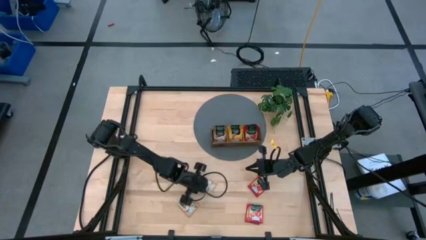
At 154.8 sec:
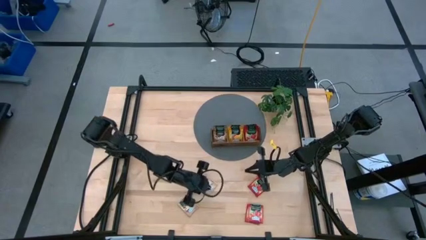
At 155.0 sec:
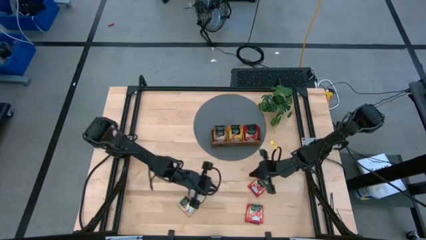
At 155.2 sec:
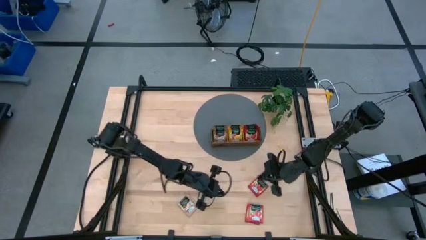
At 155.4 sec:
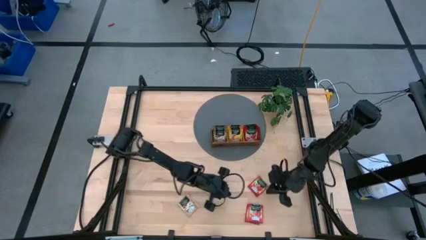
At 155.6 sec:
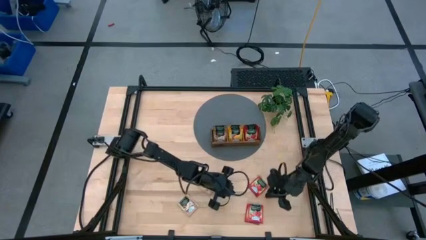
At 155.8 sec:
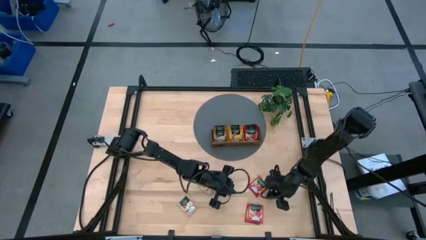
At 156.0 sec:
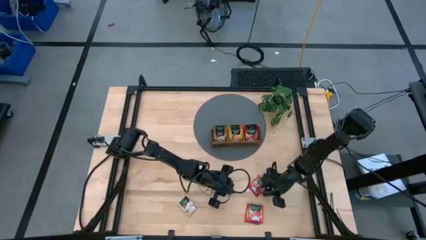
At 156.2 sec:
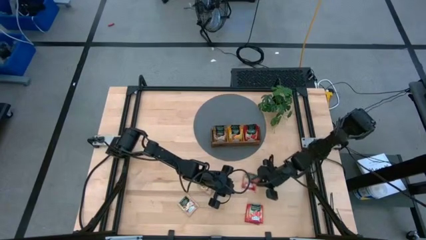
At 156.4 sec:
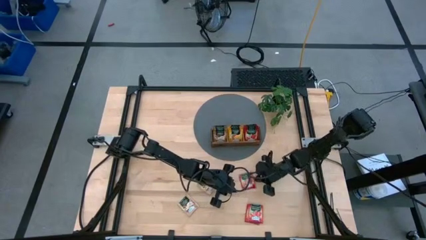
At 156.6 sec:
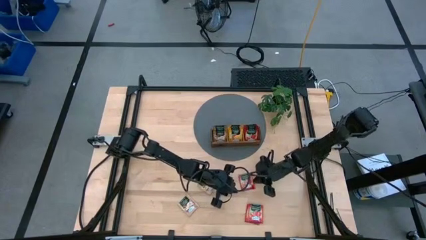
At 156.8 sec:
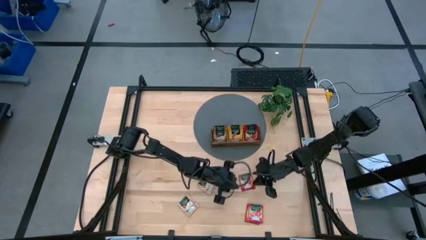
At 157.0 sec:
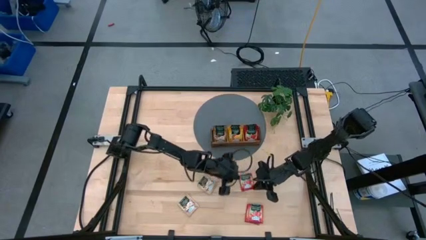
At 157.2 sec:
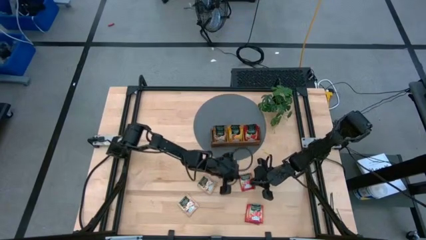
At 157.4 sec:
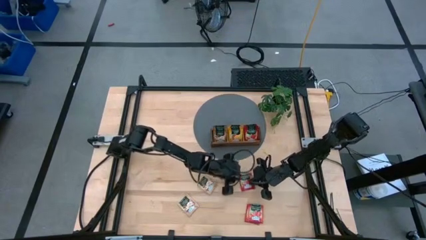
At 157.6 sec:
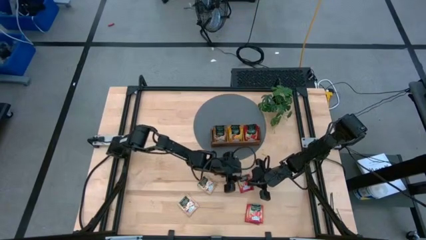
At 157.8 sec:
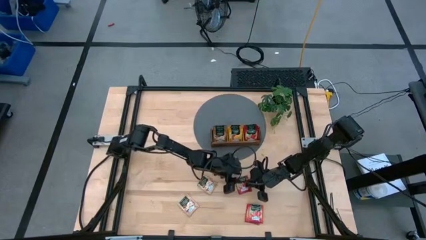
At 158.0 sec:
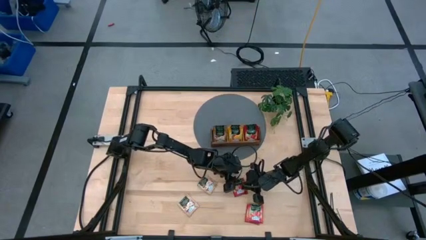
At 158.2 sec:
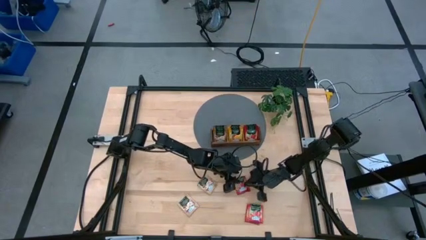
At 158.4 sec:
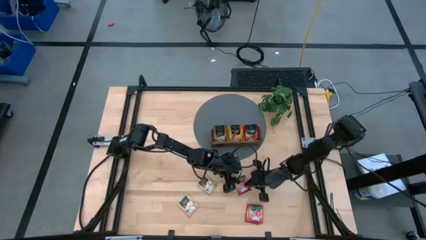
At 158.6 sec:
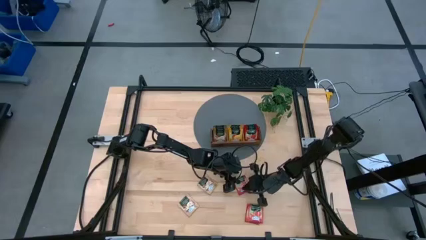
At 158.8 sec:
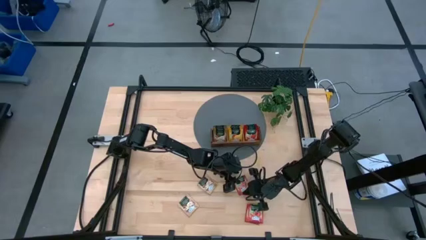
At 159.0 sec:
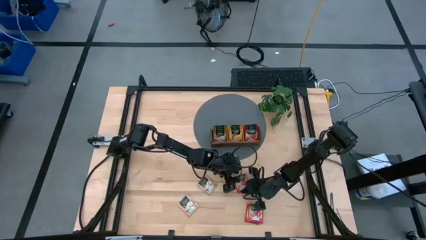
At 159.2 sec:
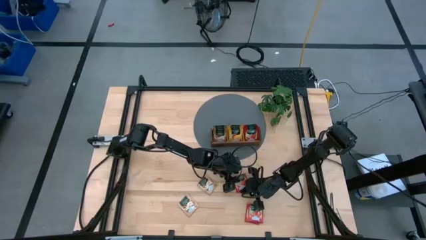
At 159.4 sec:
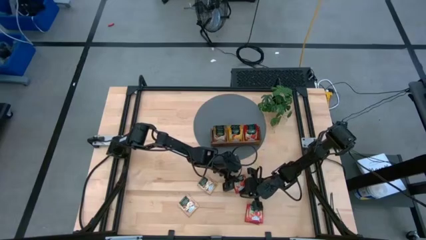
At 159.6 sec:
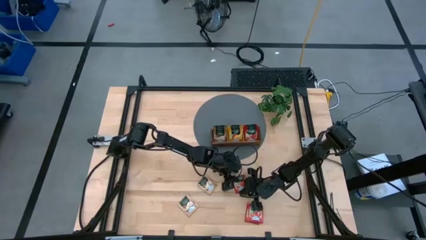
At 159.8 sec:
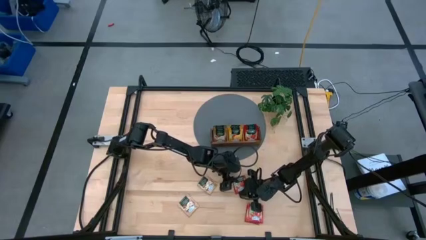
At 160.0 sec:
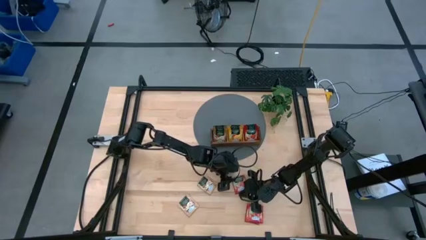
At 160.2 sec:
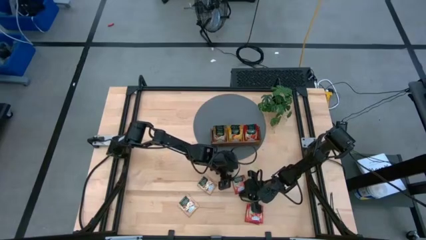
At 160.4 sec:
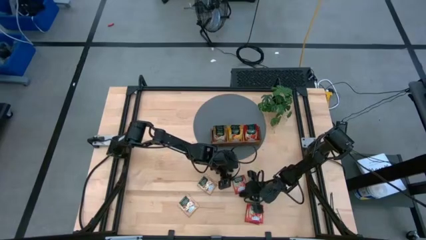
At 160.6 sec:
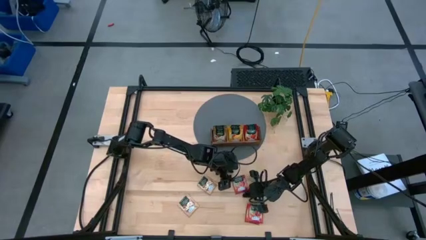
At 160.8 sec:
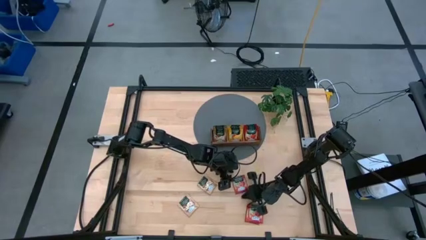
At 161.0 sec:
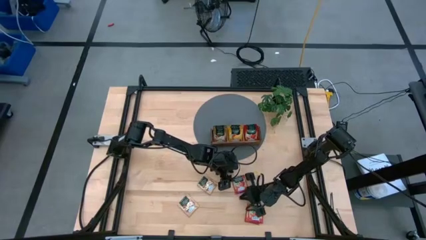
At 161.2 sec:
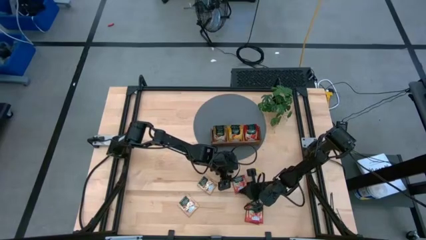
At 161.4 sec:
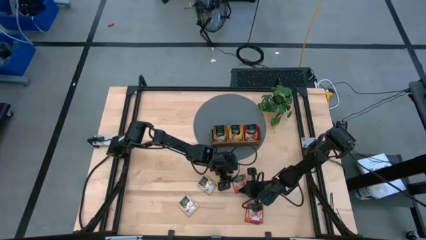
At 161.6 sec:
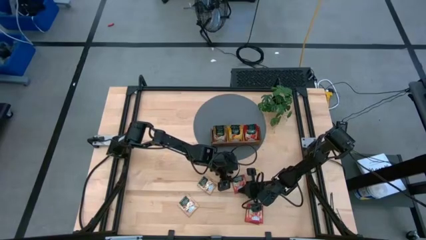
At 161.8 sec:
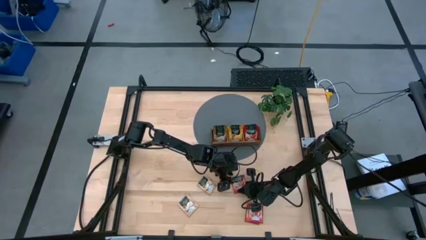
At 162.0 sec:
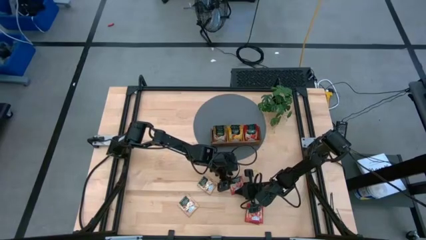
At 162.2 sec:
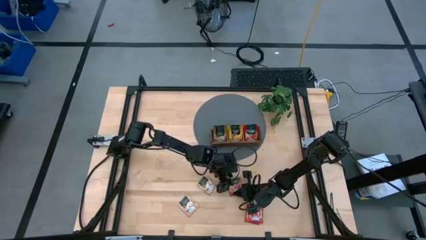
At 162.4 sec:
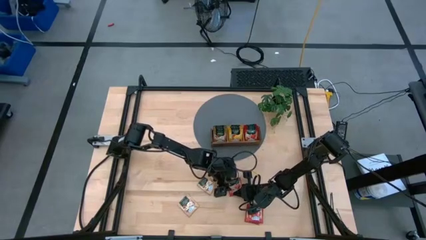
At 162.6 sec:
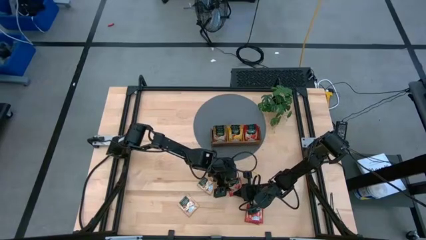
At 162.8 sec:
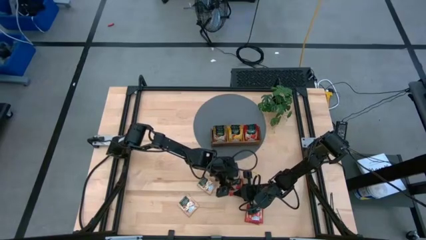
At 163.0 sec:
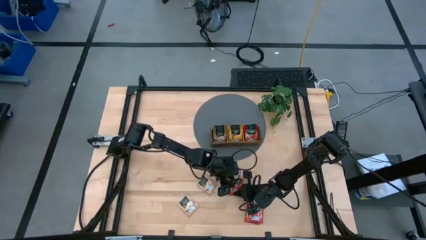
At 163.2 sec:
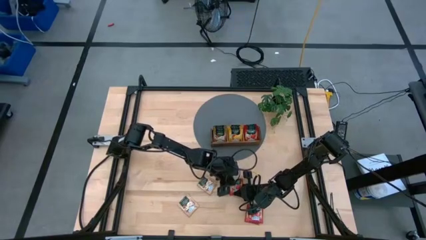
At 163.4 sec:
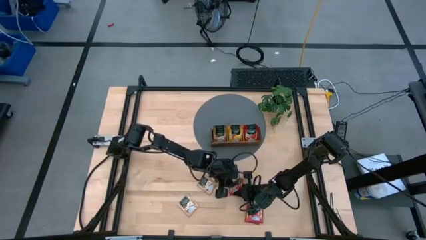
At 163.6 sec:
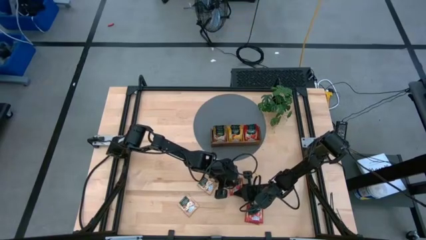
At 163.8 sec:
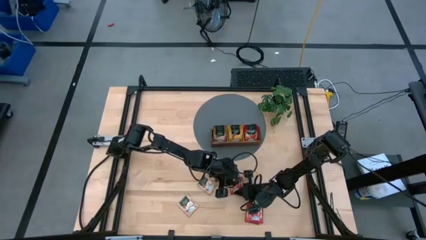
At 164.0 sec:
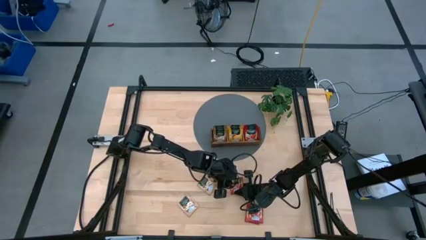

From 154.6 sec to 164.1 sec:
Task: Pick & Place Tea
Put the top red tea packet into the right section of the wooden organizer

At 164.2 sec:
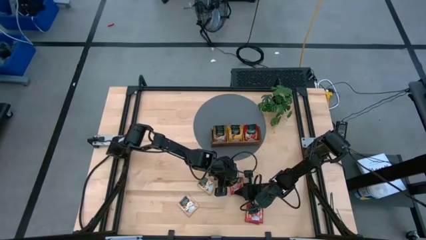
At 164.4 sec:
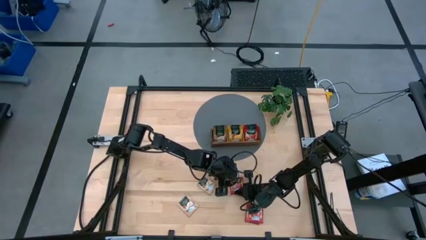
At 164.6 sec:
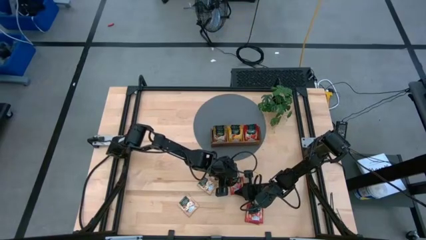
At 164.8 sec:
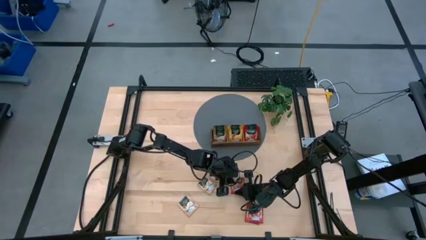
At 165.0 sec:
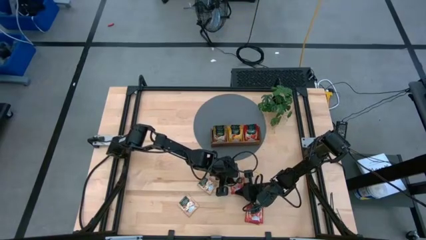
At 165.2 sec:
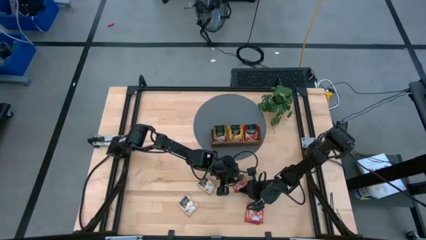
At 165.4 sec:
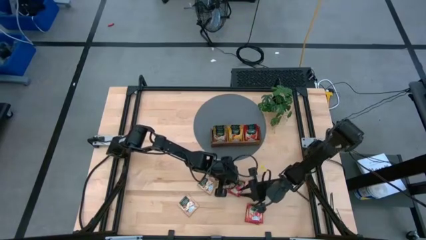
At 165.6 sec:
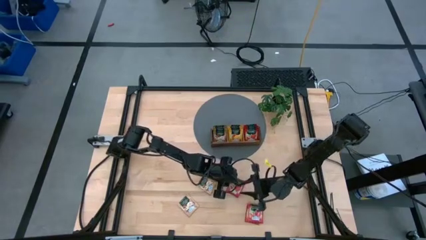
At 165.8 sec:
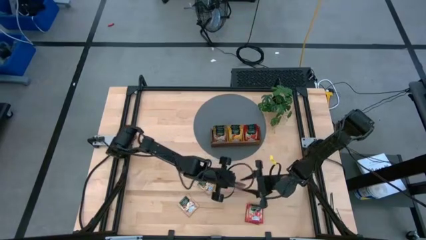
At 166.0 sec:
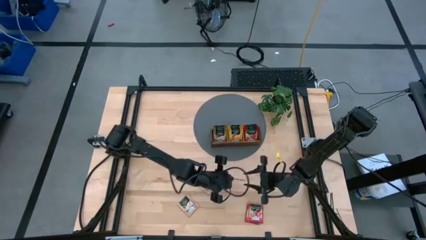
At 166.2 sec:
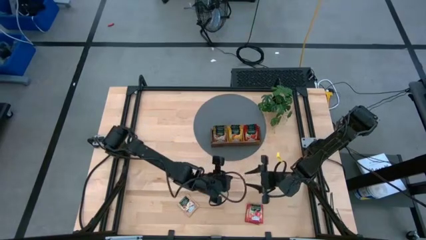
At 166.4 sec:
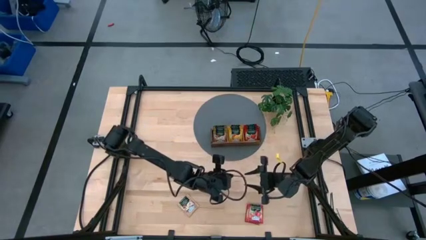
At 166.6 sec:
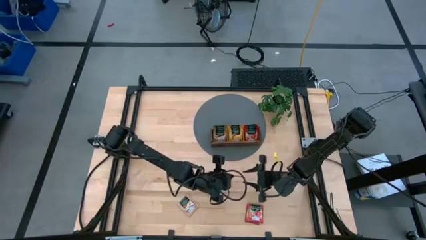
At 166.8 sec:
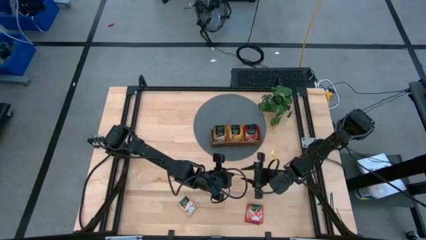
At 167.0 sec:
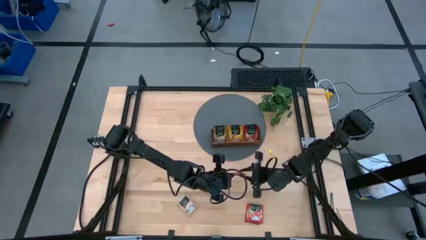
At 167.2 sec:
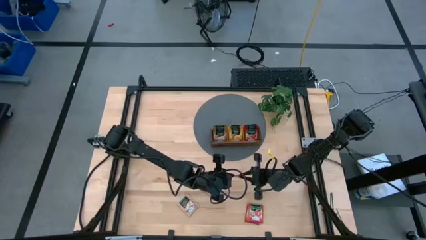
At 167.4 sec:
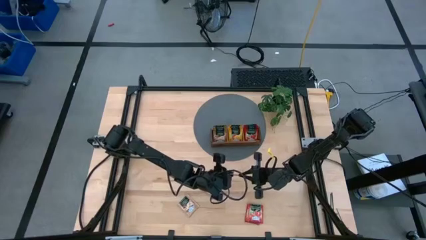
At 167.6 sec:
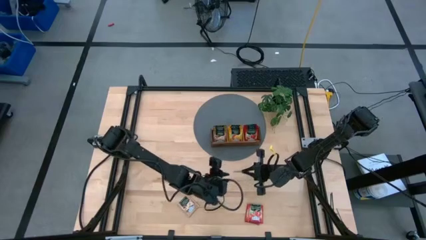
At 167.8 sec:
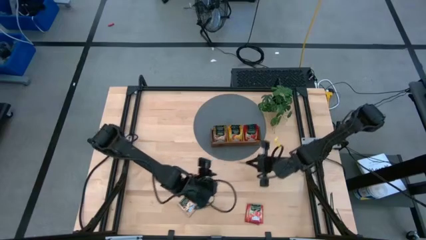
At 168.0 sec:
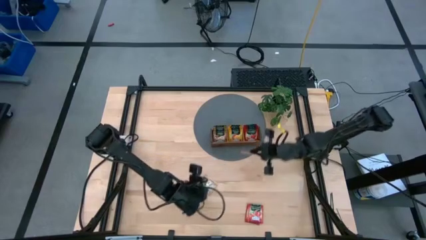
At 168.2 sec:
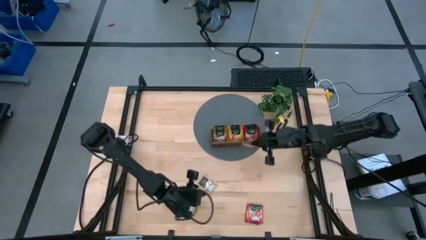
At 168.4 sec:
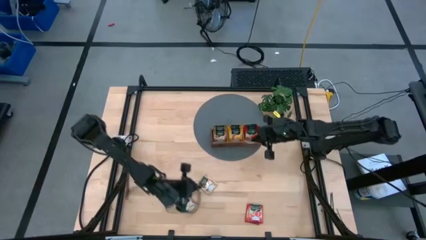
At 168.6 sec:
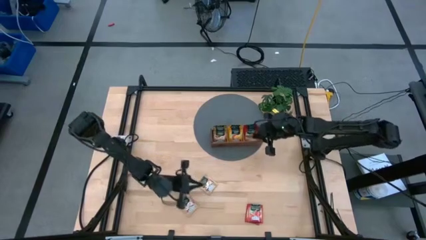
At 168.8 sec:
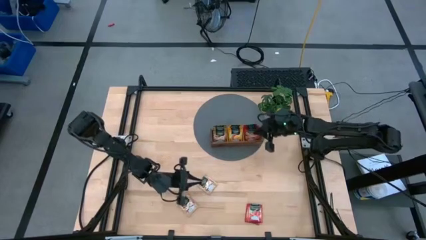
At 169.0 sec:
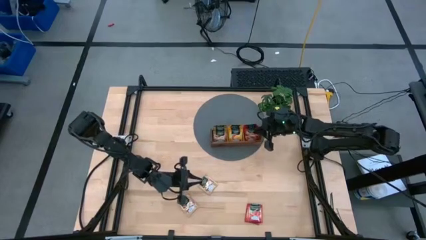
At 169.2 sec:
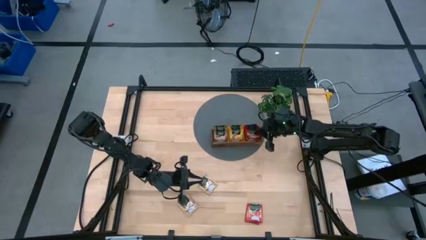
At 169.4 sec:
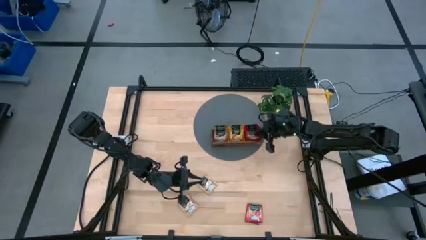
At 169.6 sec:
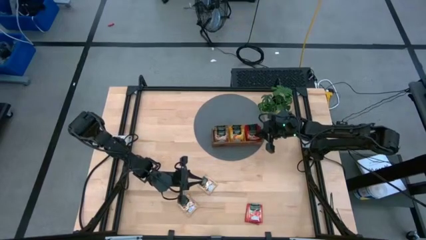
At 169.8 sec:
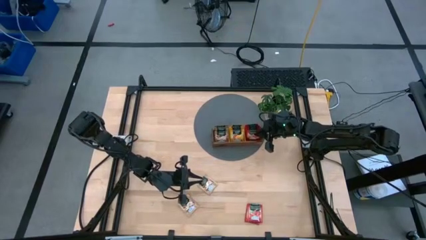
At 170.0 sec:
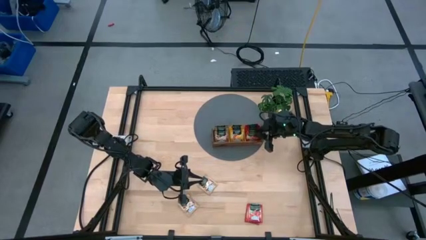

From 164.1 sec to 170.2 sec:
Put the top red tea packet into the right section of the wooden organizer
